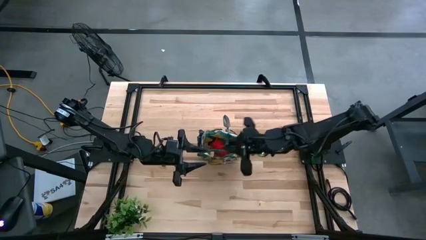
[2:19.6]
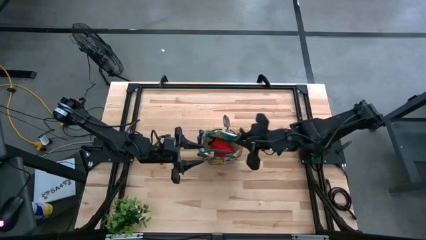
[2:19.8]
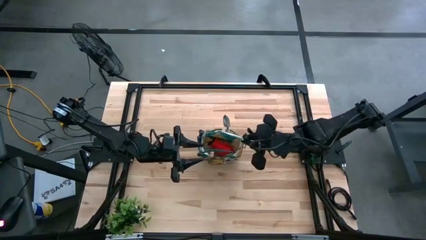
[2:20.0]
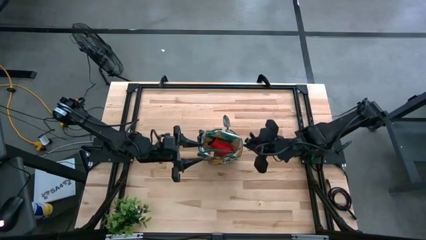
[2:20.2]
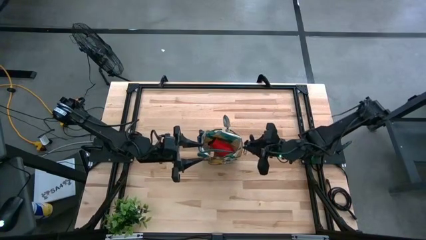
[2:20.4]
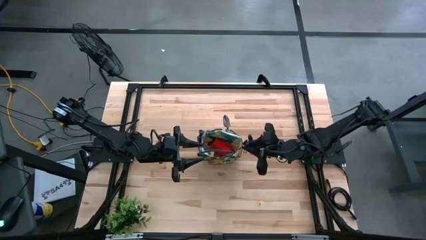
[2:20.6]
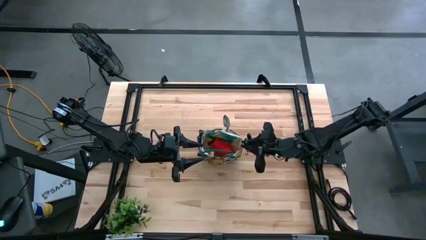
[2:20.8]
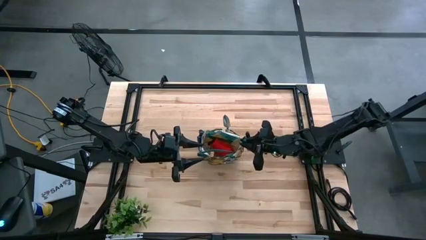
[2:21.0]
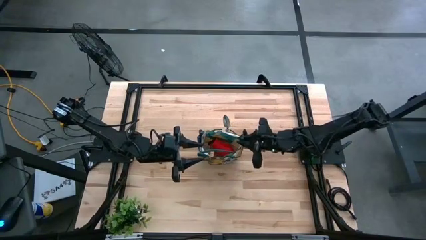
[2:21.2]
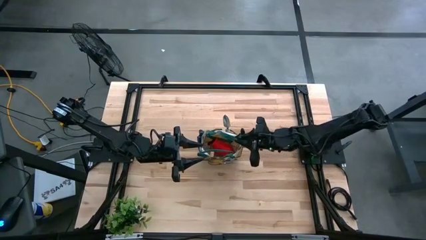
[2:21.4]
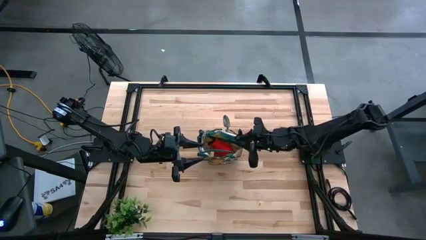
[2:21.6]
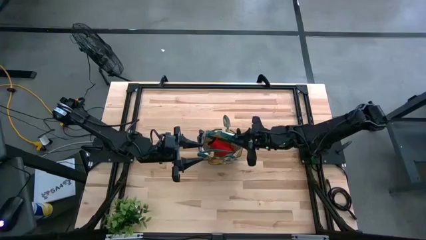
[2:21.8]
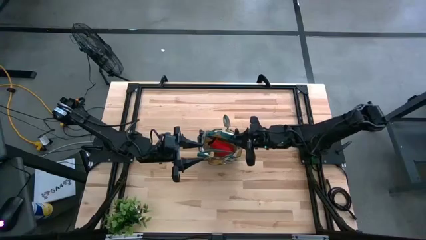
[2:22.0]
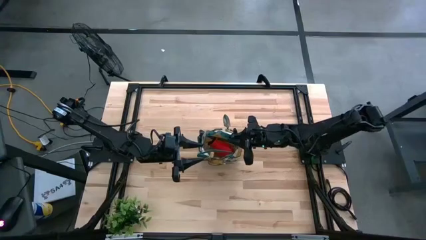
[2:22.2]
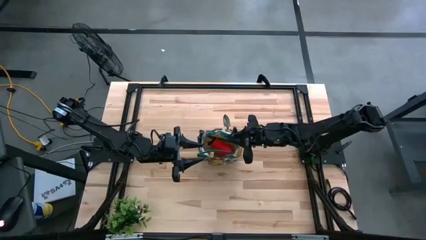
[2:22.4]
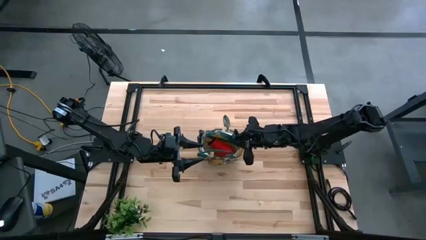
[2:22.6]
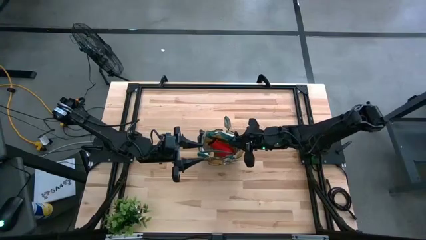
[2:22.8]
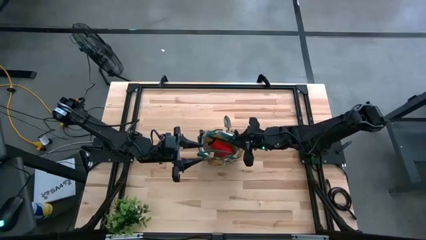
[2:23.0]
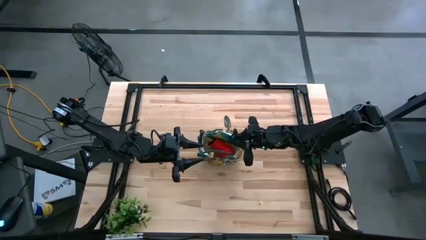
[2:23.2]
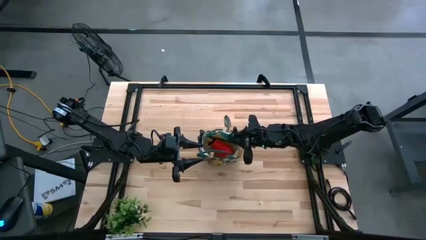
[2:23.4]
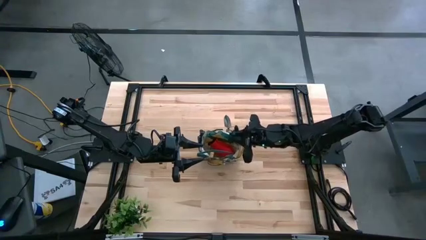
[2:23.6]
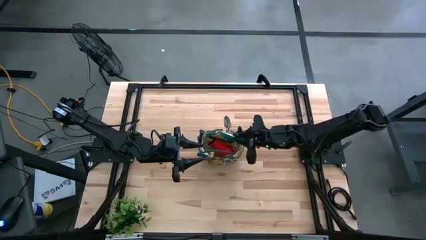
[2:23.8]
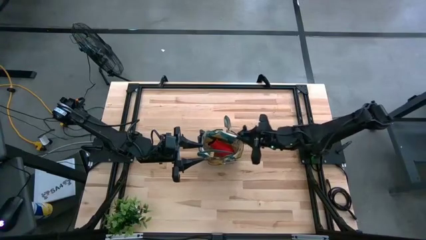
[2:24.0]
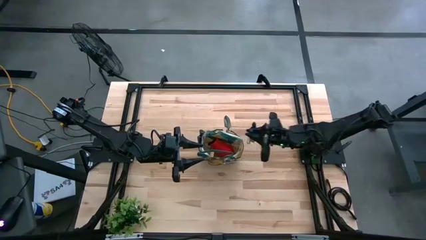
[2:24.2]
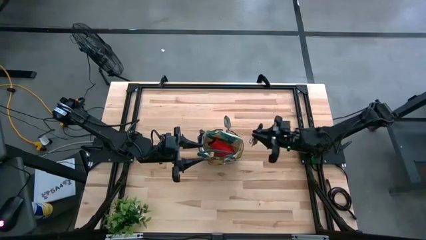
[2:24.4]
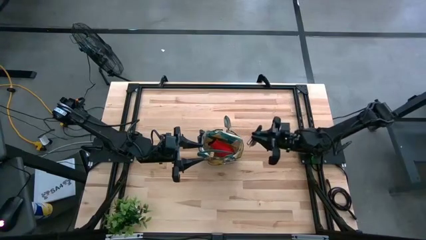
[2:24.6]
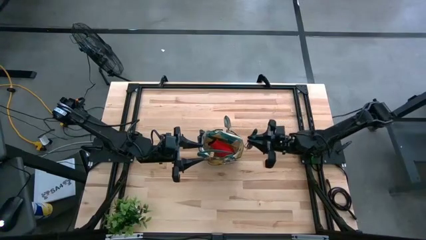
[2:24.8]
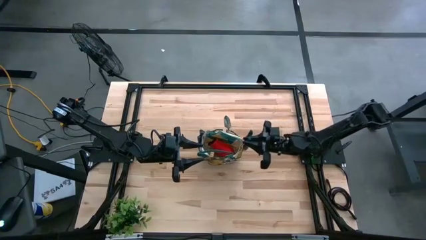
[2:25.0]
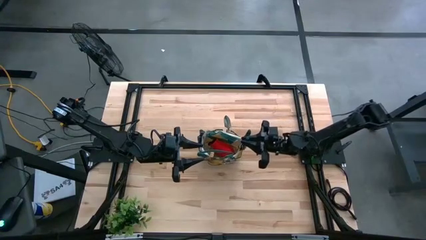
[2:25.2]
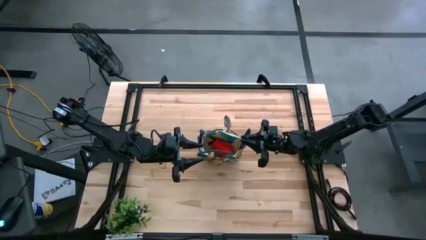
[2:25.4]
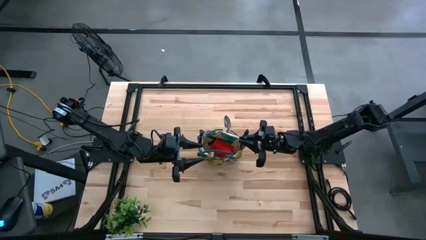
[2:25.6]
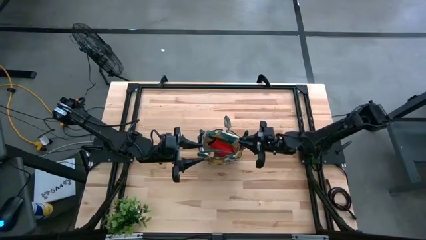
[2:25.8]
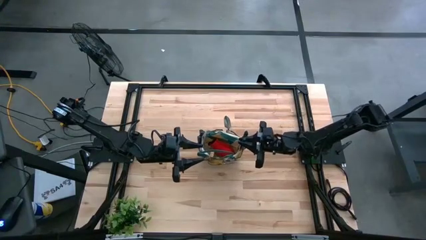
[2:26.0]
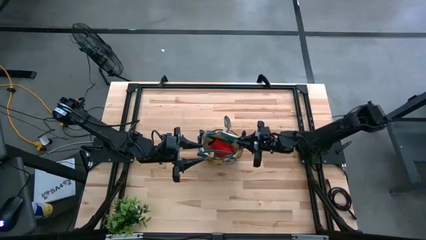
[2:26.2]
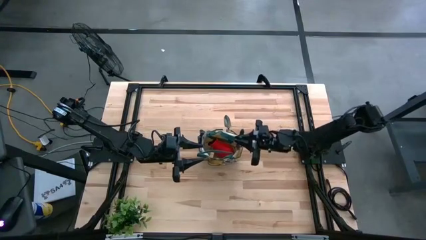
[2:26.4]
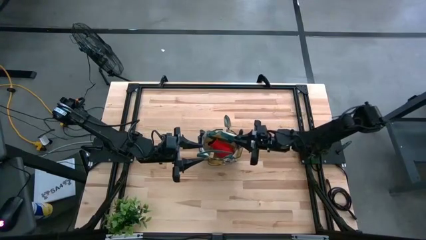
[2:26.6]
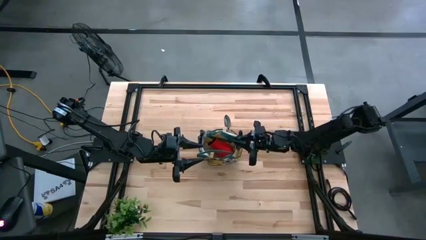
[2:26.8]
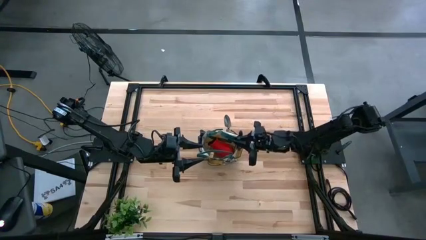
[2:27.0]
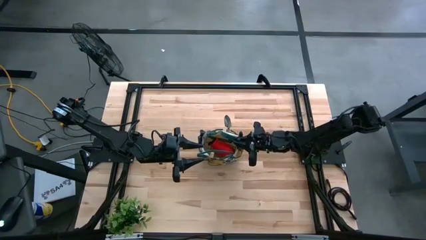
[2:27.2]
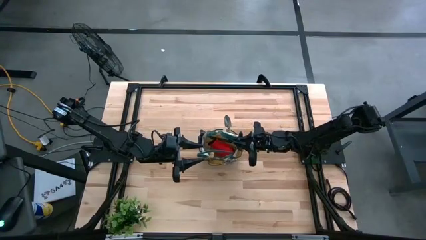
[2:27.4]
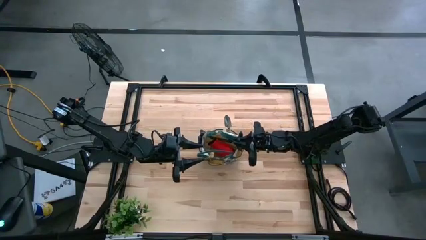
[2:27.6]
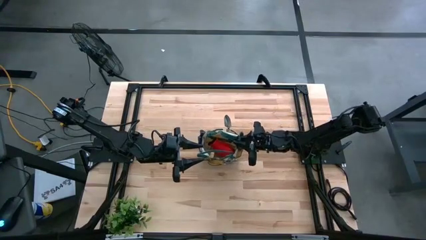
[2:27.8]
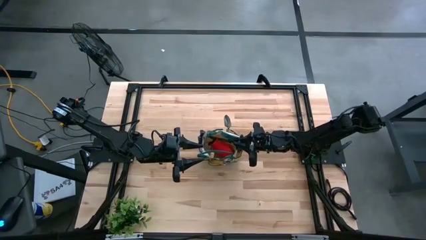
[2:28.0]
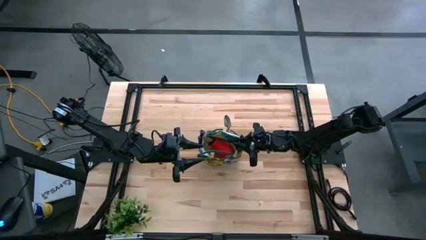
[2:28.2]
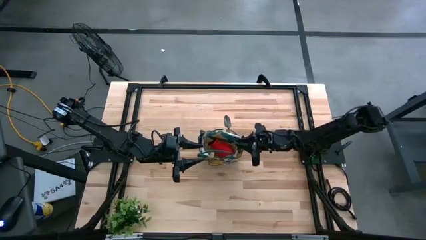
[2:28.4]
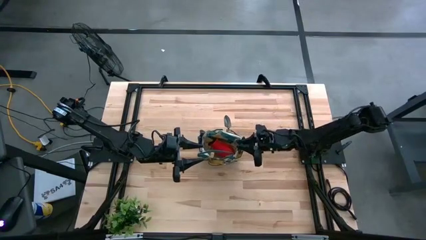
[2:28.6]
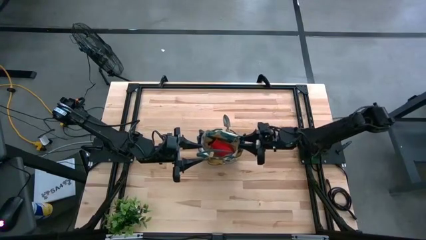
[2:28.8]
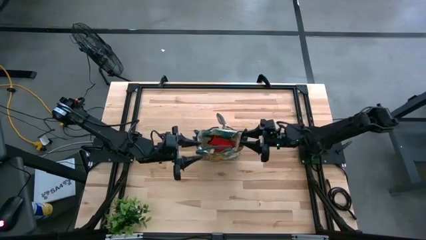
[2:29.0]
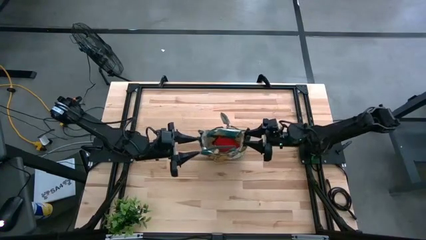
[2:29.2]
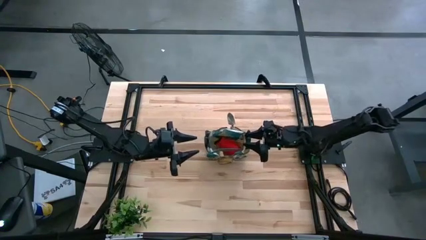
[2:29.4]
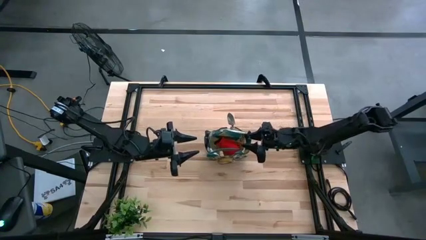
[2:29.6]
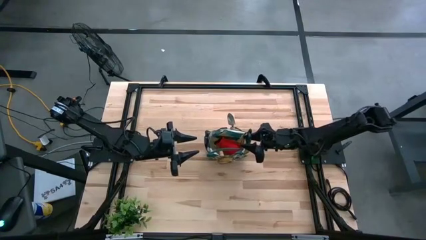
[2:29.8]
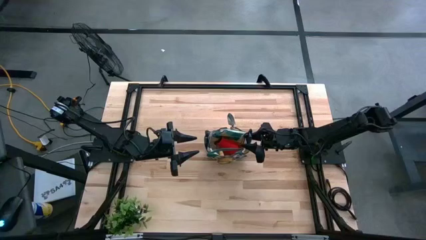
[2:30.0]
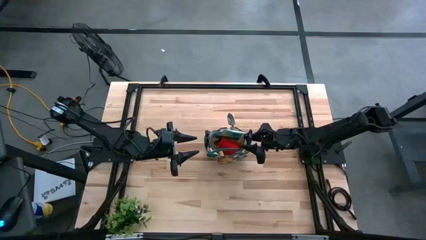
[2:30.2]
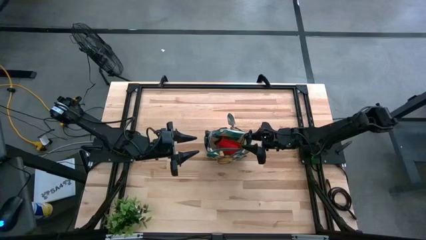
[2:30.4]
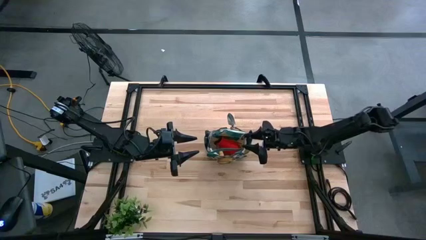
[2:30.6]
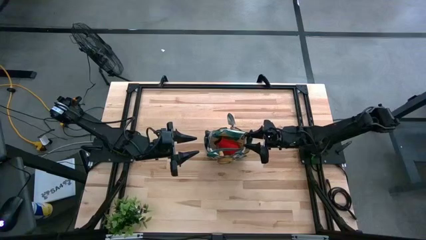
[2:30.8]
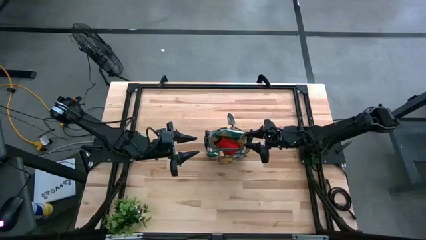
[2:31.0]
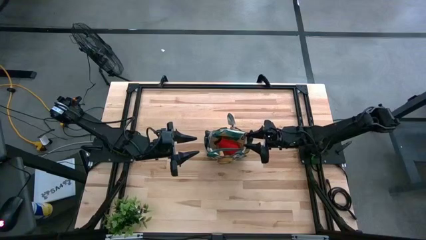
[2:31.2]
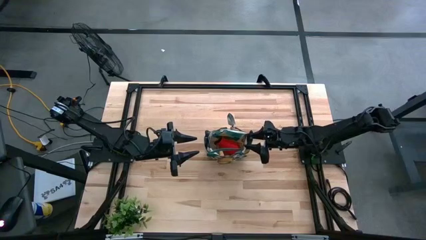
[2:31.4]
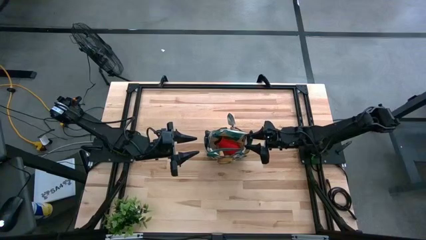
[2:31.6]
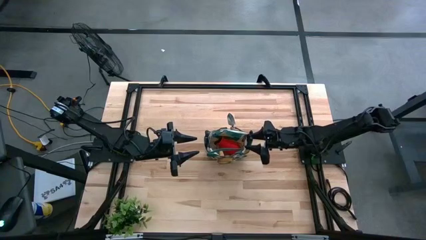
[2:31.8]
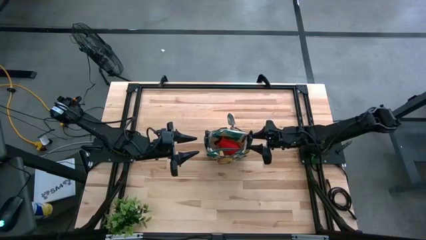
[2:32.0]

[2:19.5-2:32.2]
Task: Pick & Place Garden tools in Gardening bag
Put the green shear scissors into the gardening bag

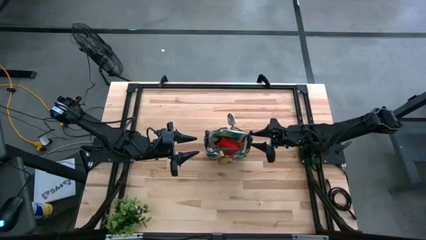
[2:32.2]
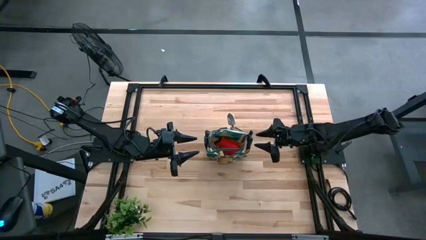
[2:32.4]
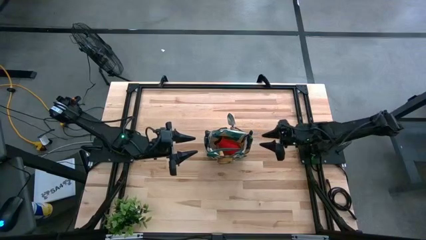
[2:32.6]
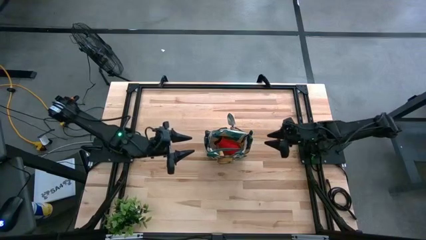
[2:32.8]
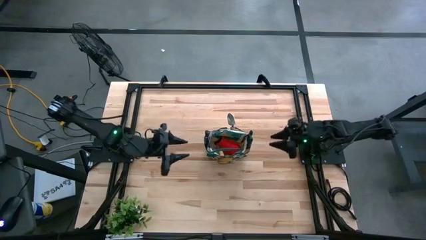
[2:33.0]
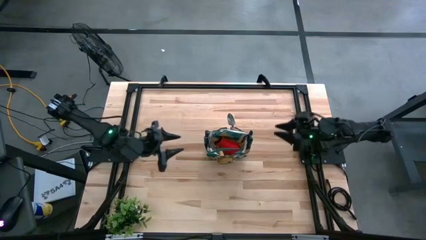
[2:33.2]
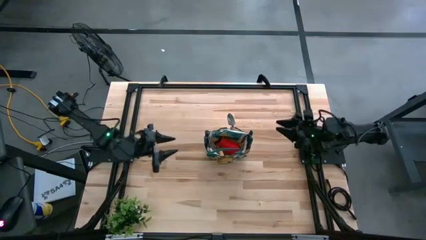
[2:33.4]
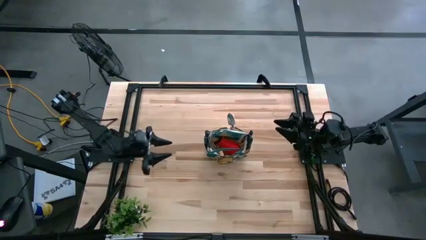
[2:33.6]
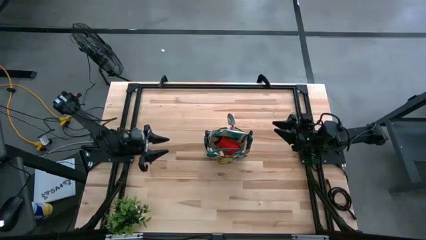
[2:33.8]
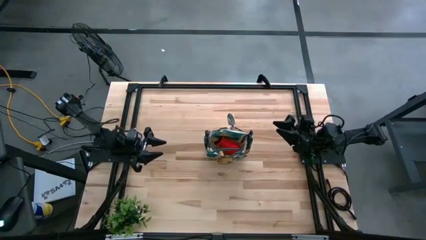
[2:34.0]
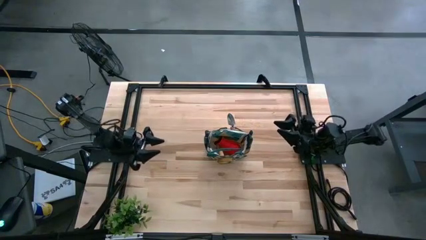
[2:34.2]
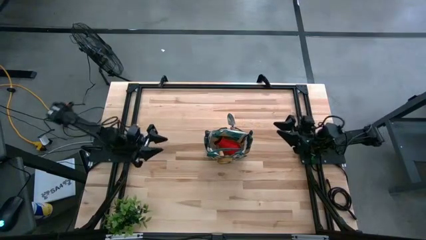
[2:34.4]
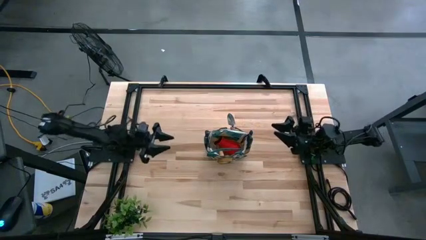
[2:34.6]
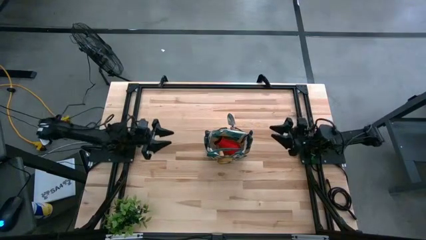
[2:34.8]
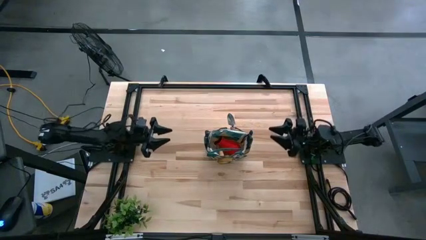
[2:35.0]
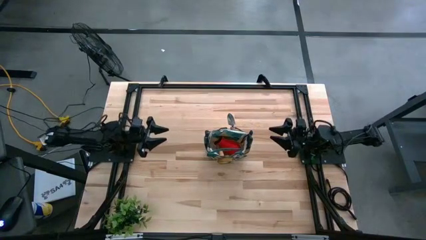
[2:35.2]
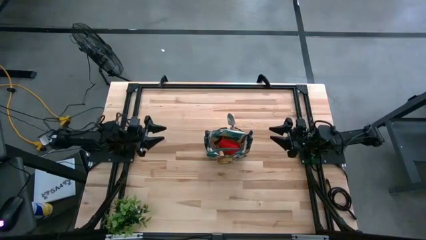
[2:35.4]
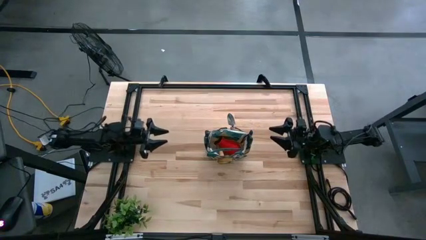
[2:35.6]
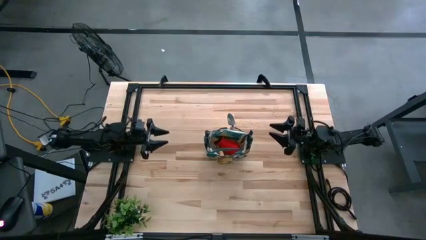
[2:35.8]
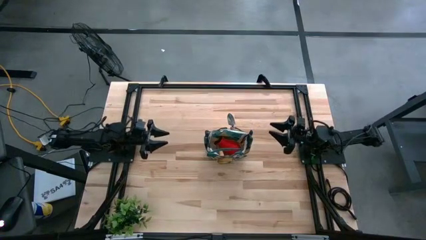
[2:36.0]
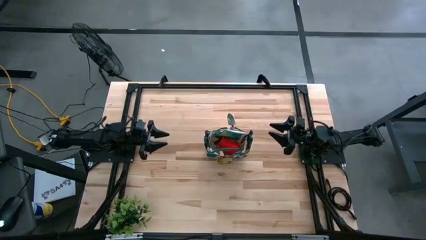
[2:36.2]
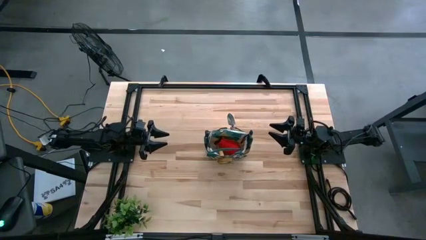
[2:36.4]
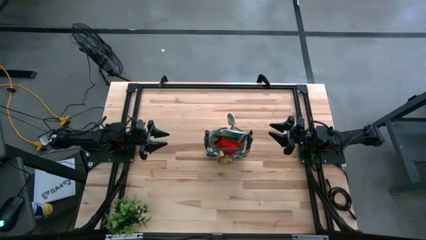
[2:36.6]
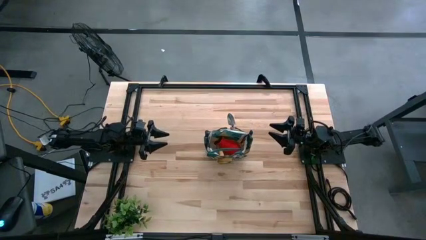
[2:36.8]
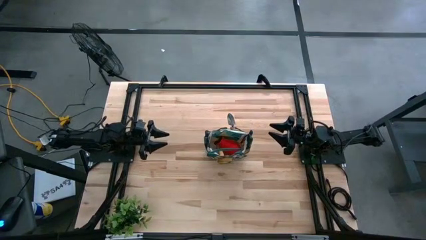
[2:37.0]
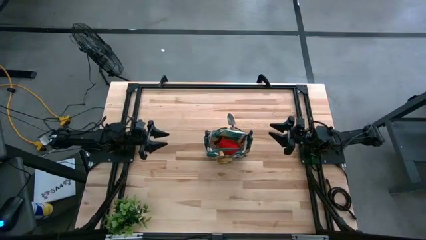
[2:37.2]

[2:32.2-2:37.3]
Return to Home Position
